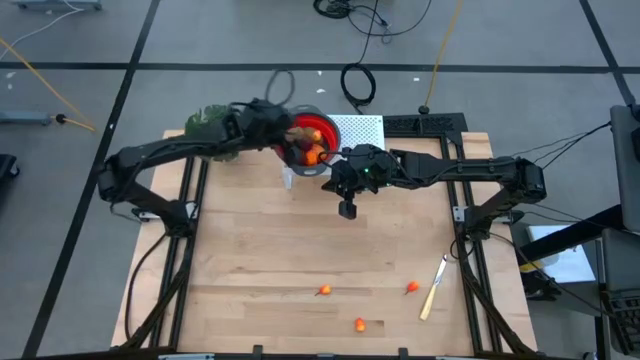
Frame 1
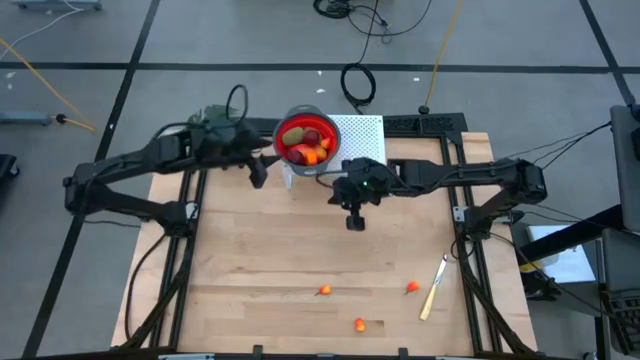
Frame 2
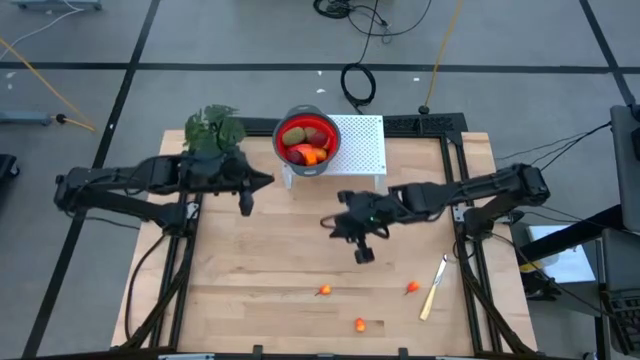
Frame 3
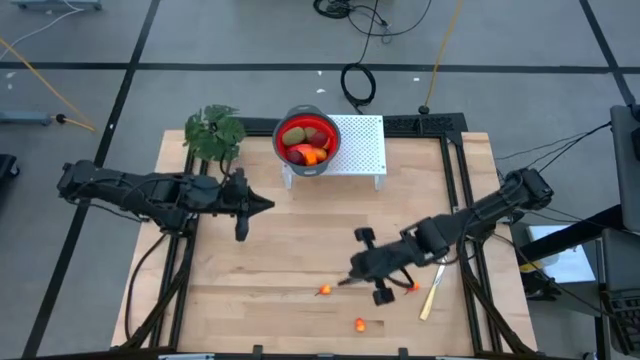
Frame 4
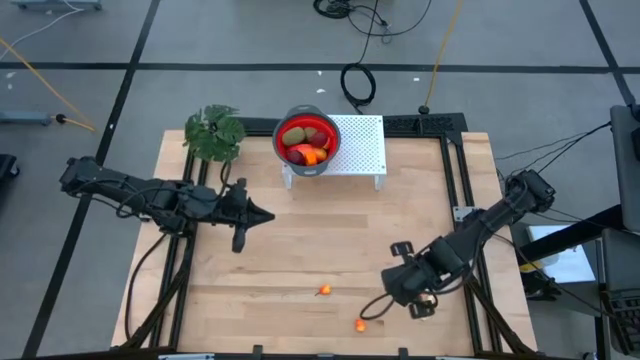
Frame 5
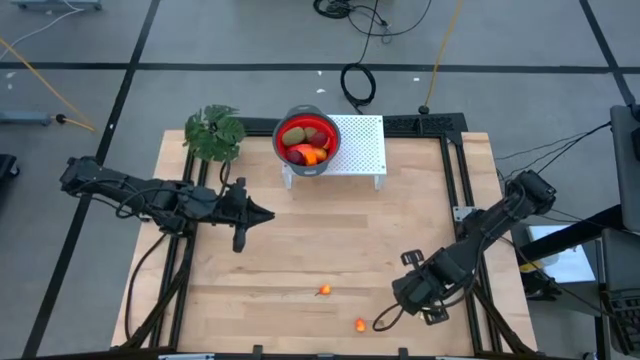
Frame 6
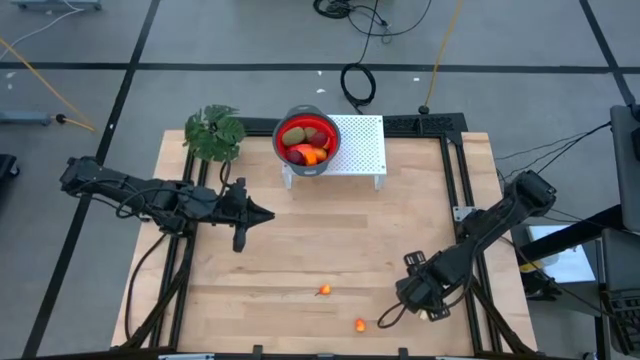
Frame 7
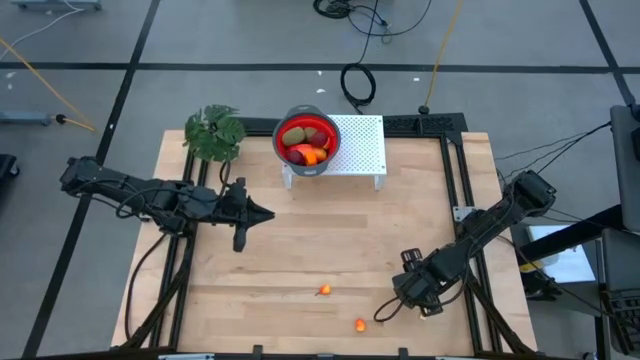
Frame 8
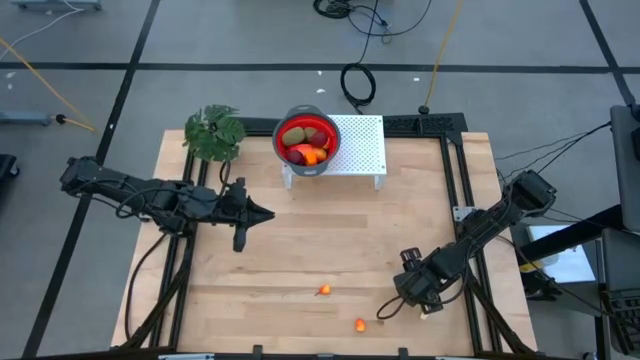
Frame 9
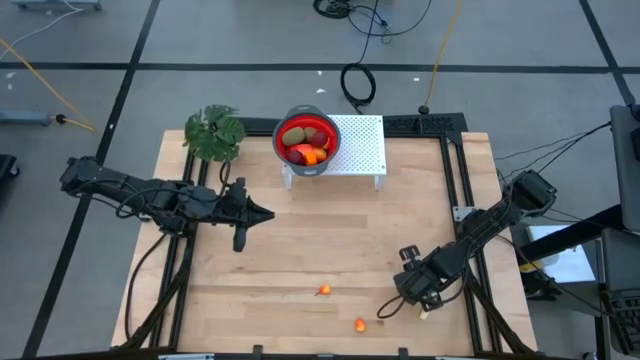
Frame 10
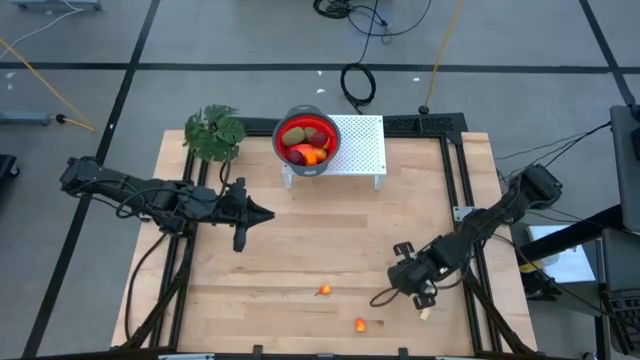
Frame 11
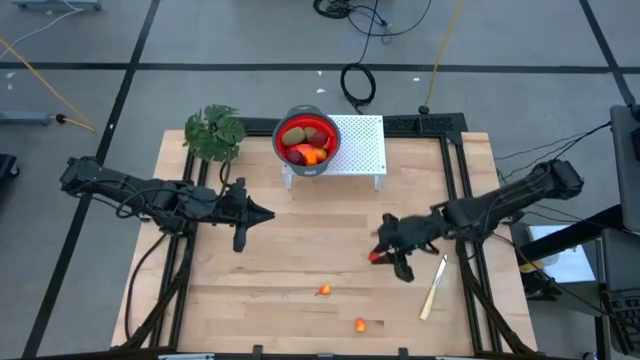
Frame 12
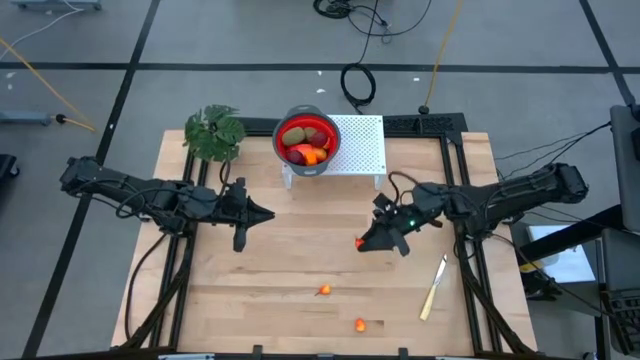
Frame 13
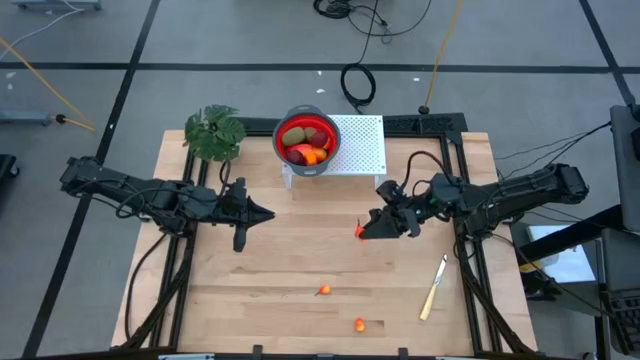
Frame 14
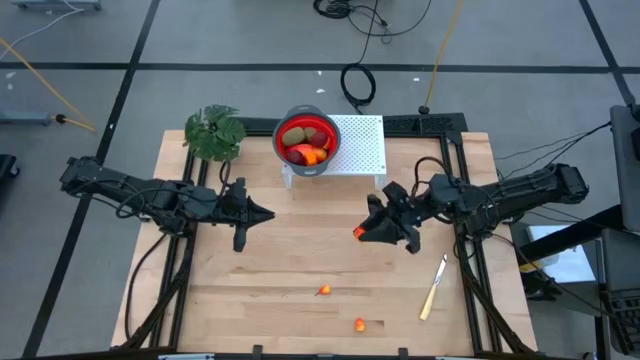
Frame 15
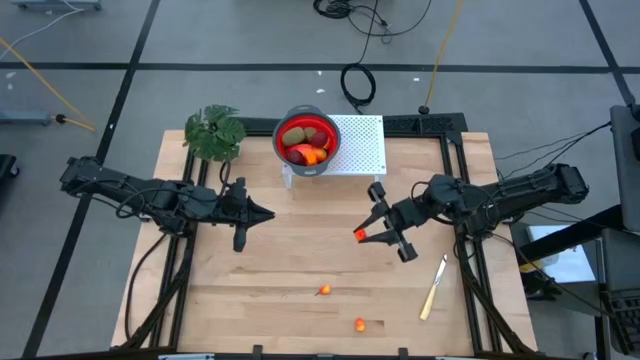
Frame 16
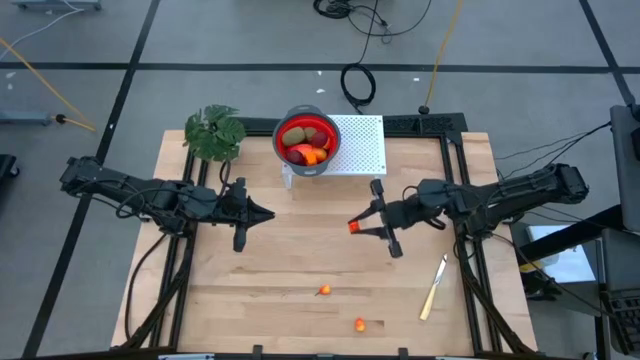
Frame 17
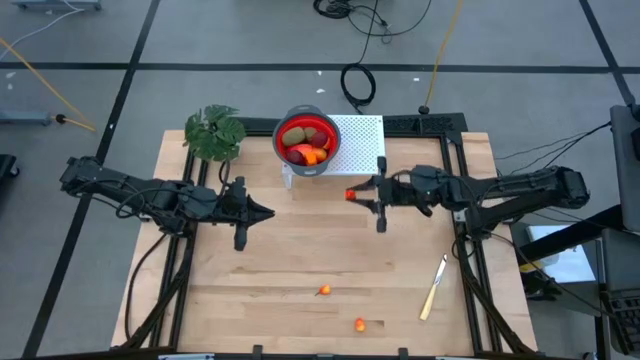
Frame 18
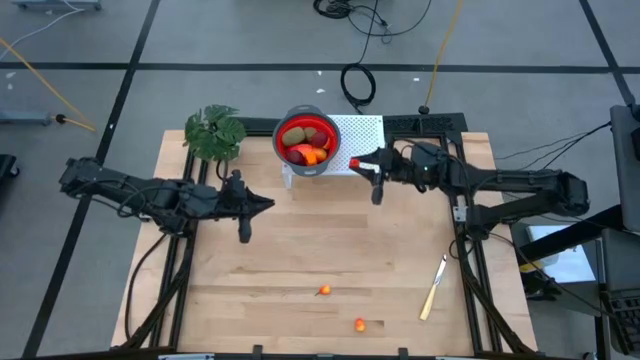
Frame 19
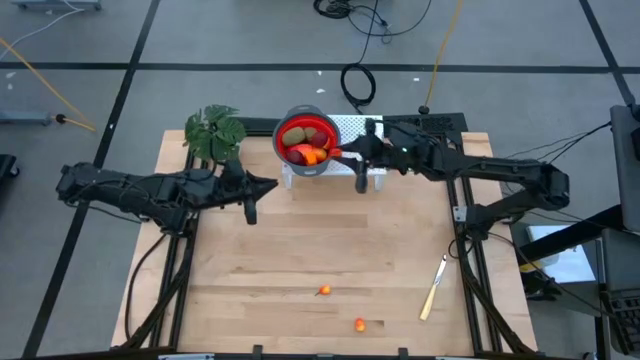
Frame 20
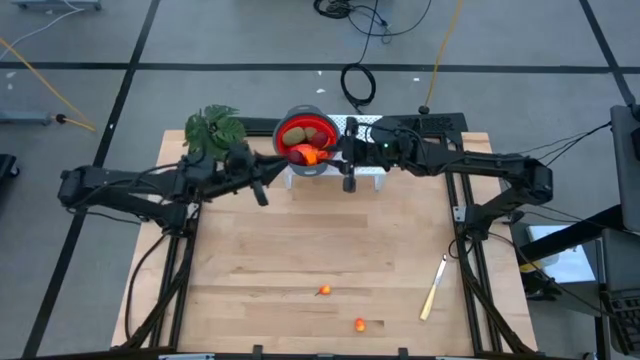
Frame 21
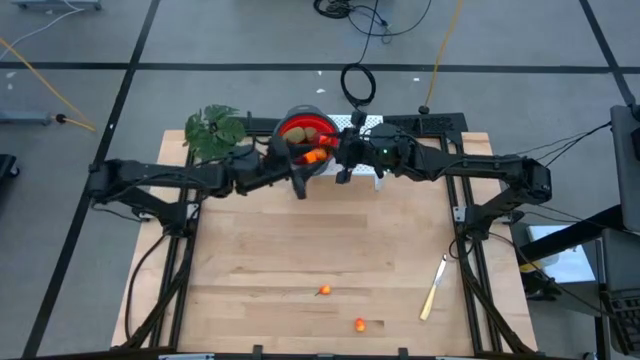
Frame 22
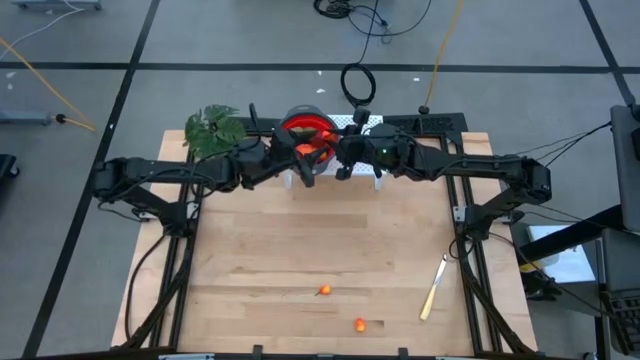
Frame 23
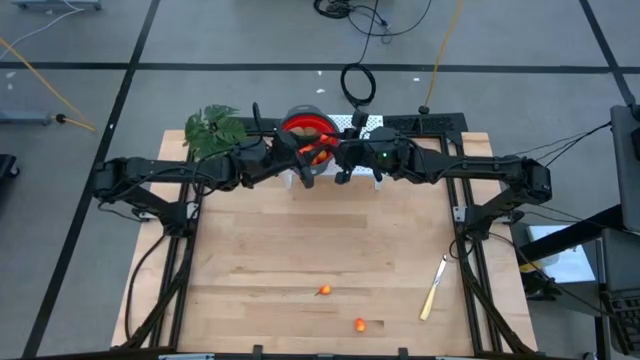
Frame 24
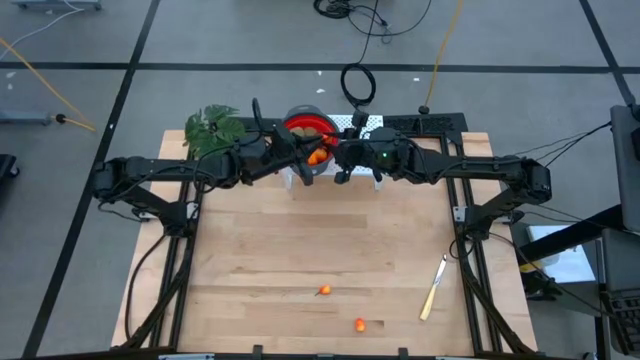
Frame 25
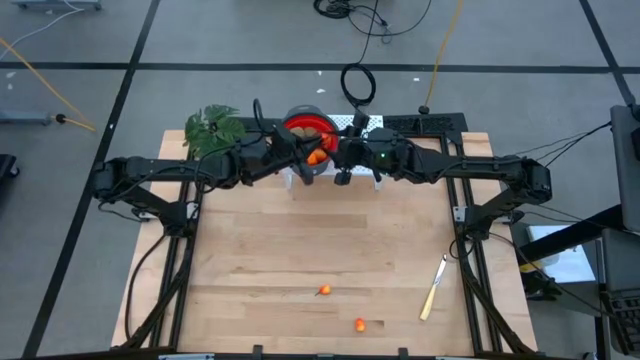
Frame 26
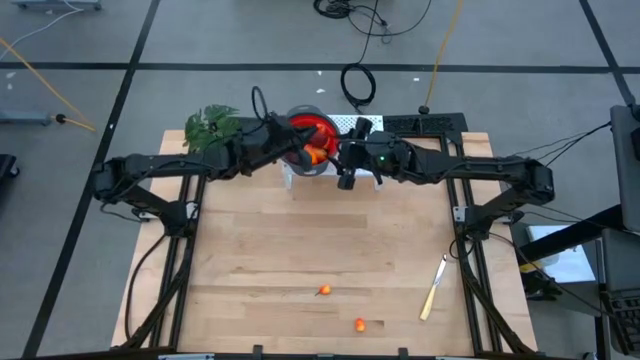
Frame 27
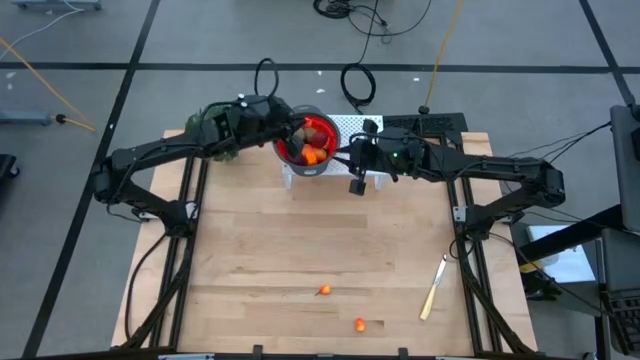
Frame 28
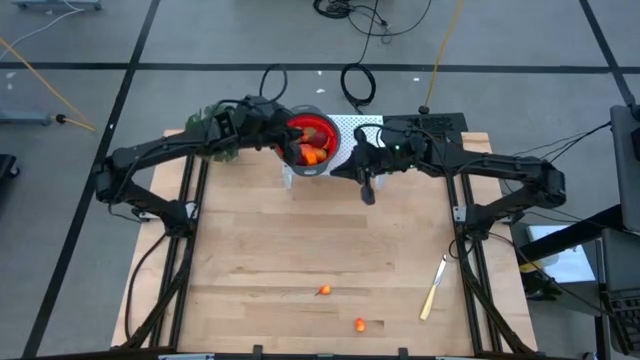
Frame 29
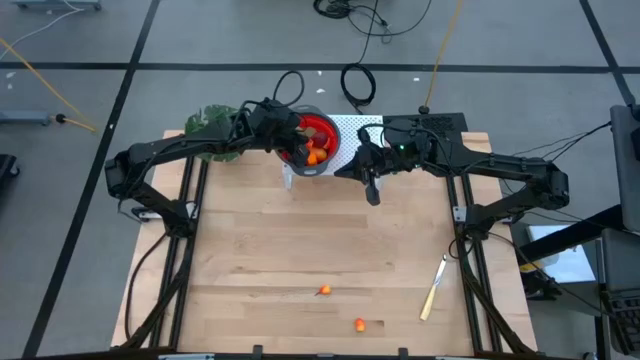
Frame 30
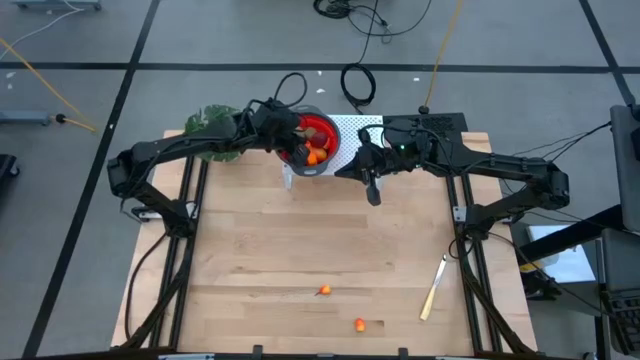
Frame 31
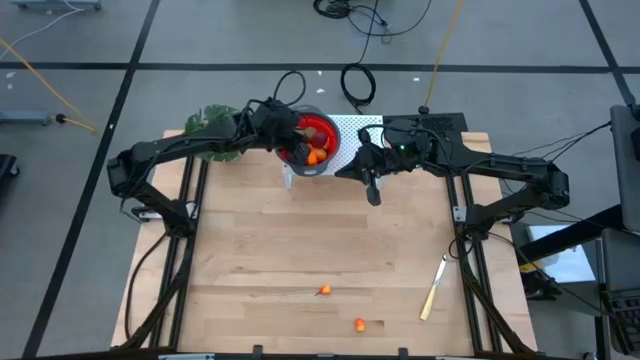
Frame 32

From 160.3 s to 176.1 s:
Task: Pick & Place Fruit
Put the right peach into the red strainer bowl

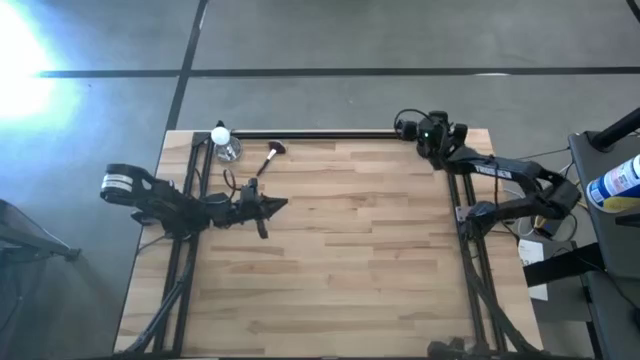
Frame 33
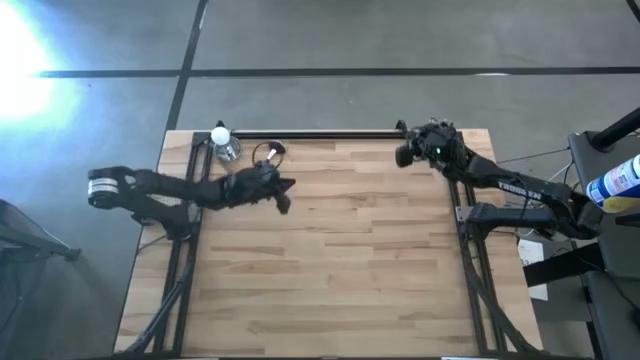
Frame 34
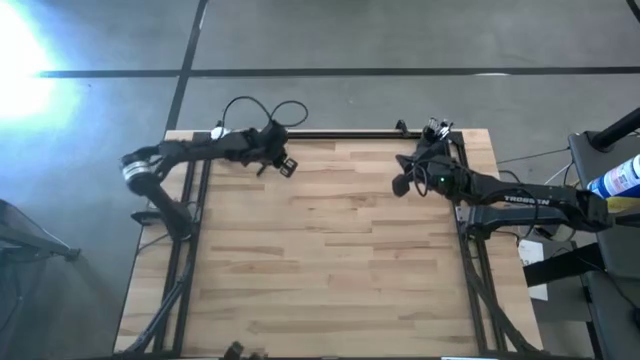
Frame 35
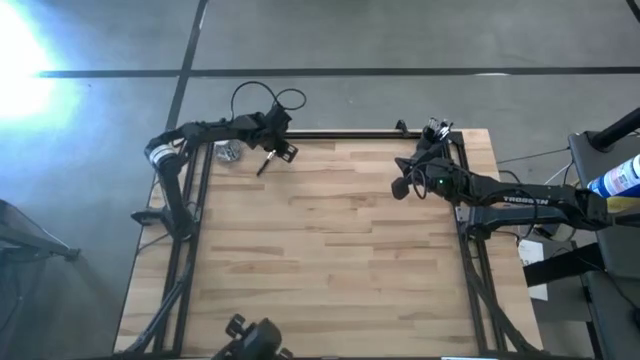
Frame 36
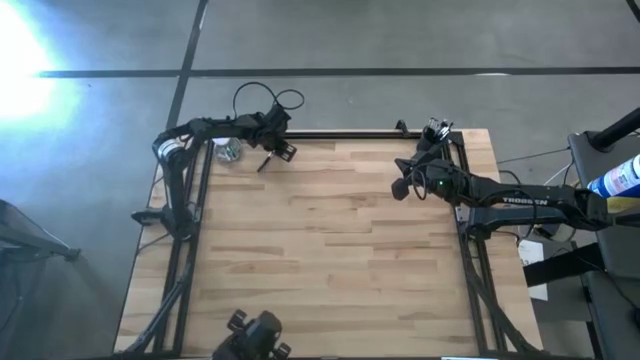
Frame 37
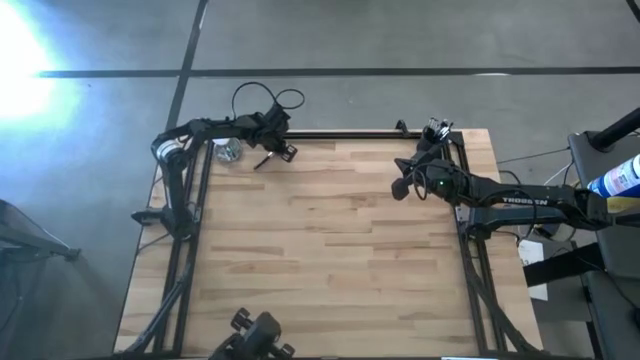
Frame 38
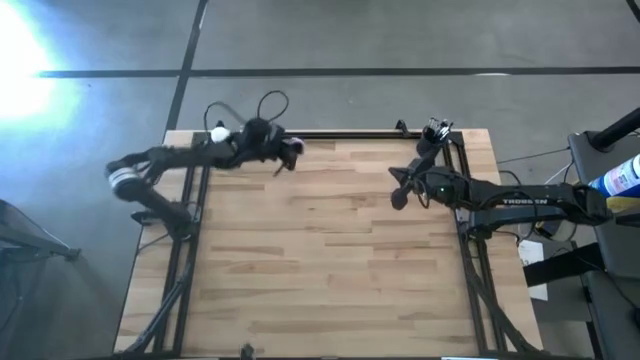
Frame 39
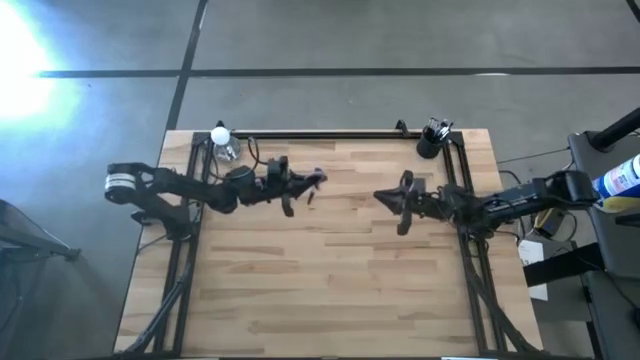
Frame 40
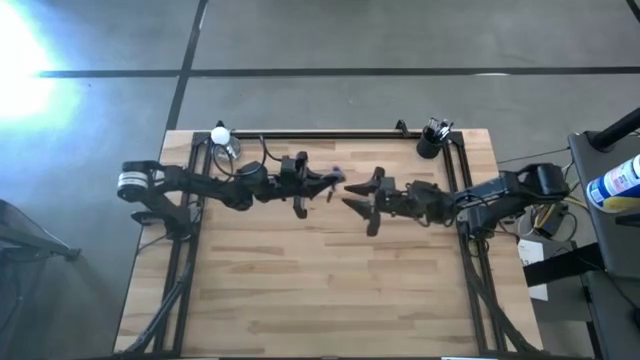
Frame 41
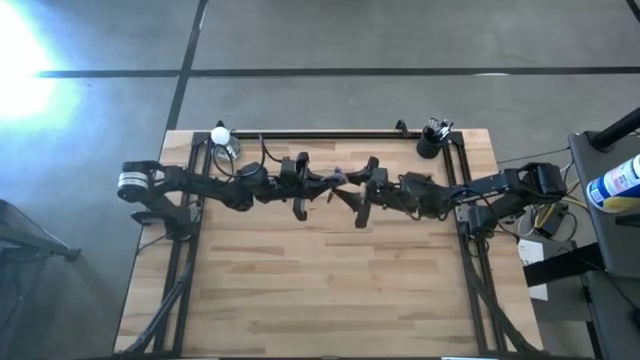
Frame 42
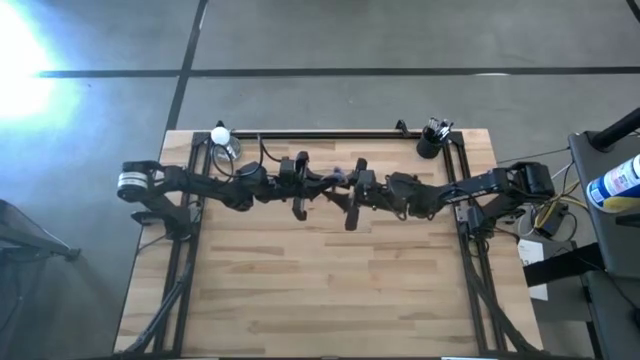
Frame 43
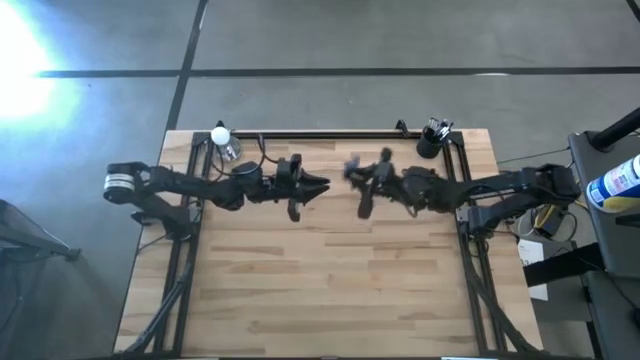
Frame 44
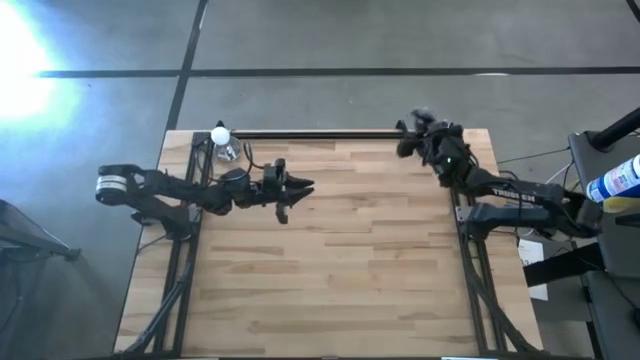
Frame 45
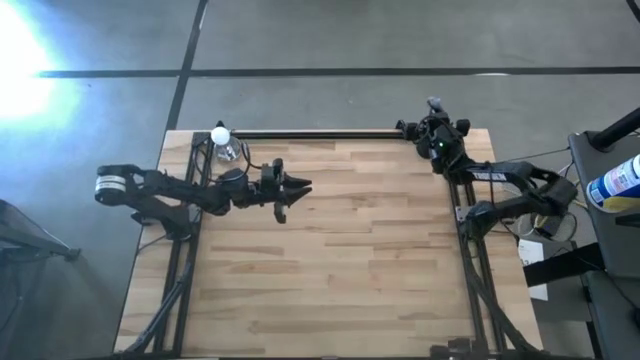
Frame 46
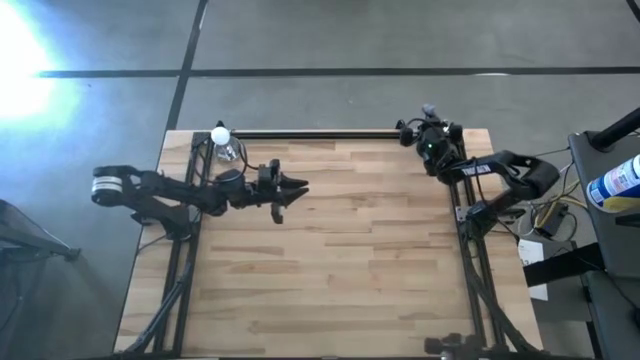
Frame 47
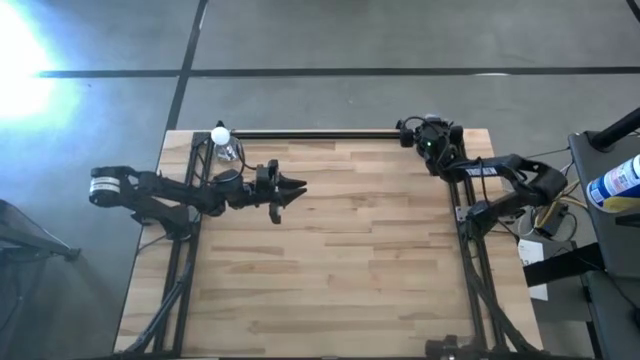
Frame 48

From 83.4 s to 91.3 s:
Task: Put items in baskets/containers
Put the highlighter brush into the mesh organizer
